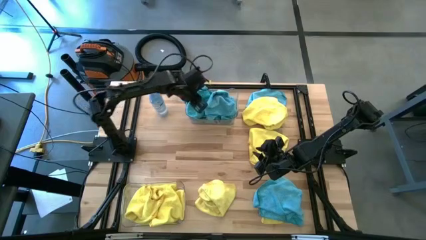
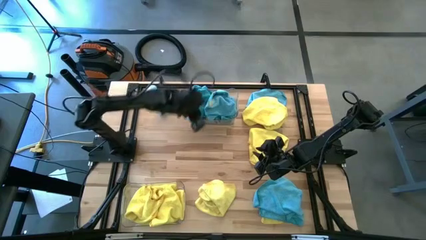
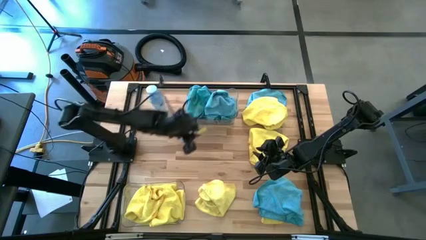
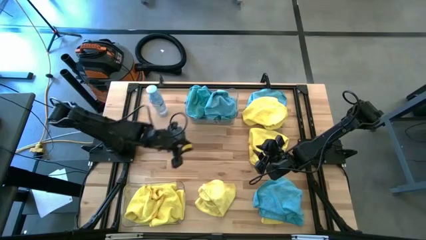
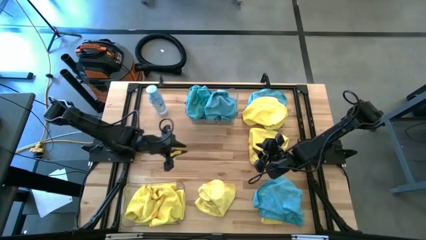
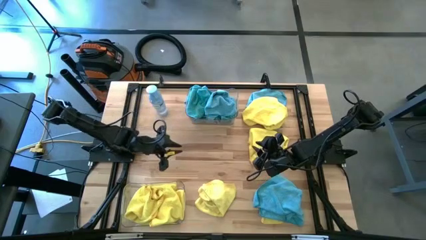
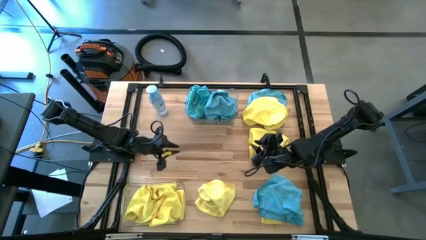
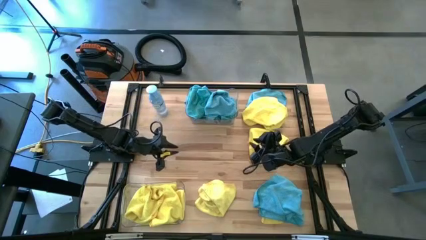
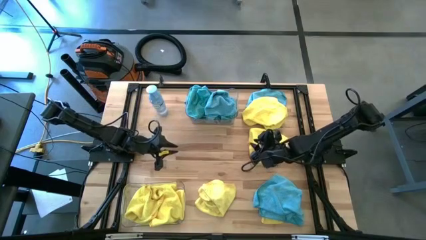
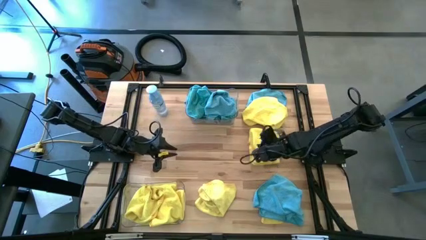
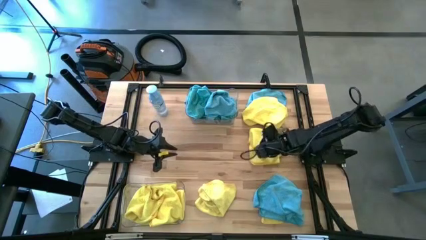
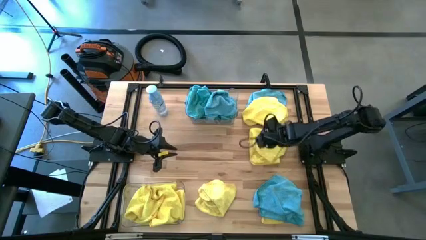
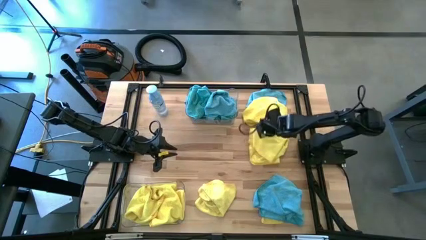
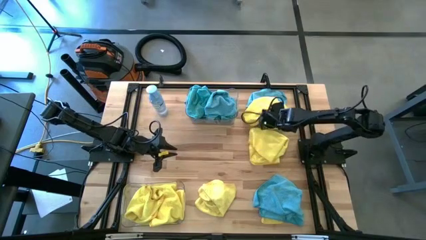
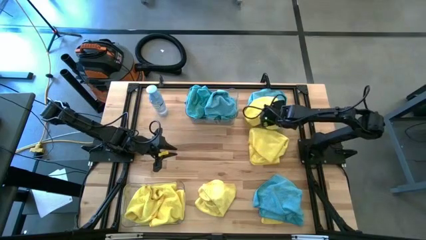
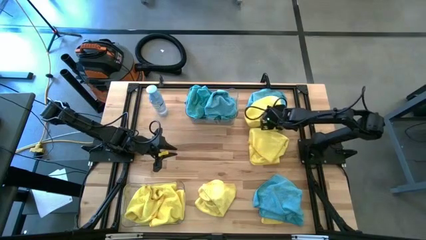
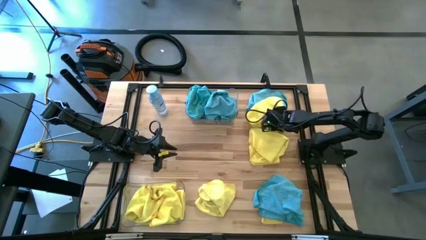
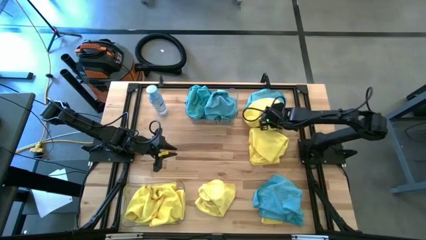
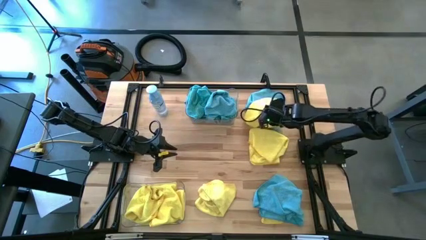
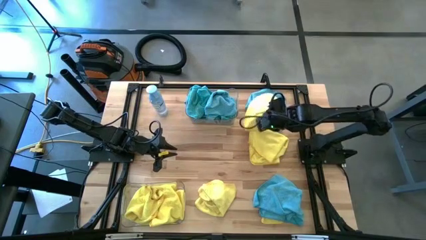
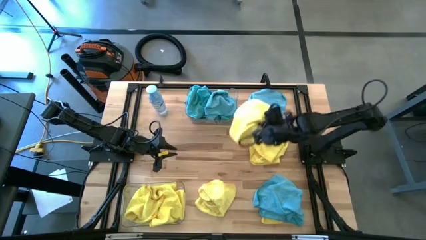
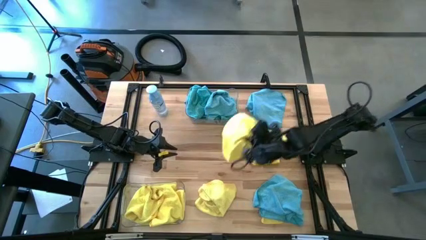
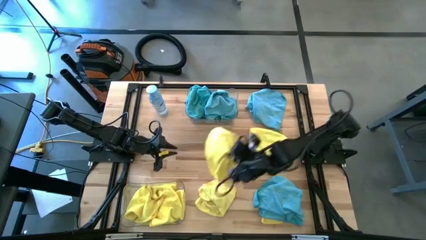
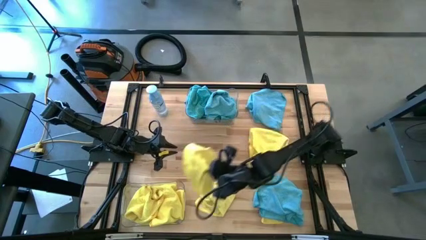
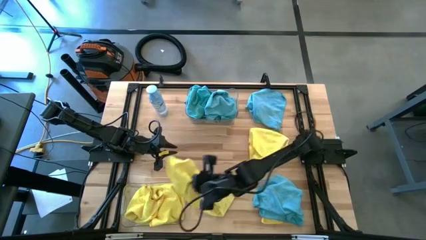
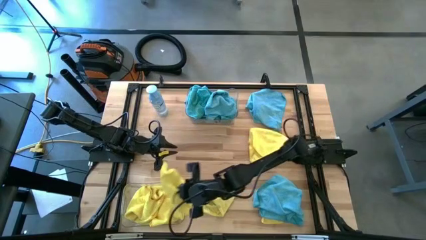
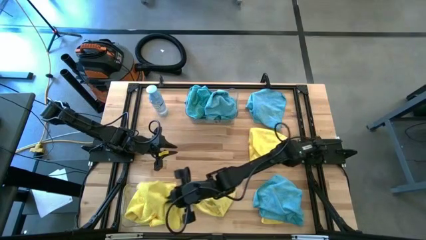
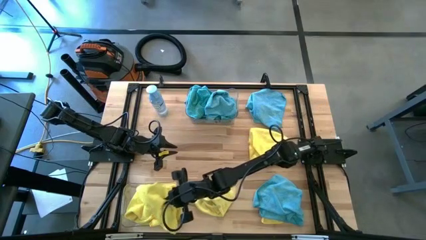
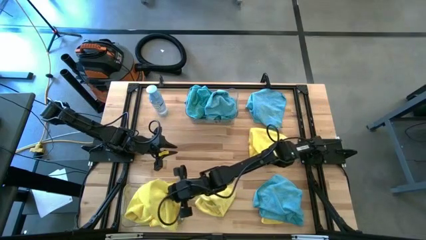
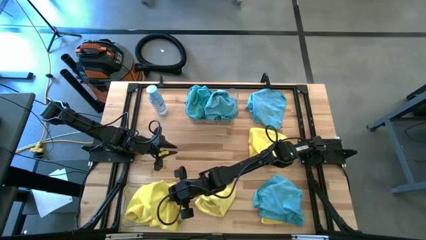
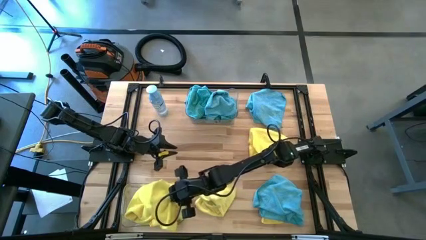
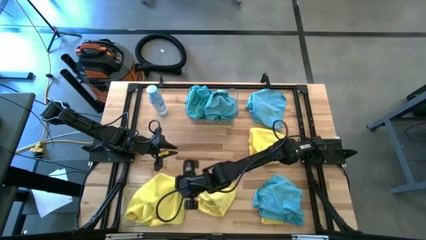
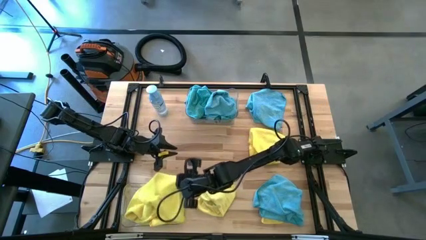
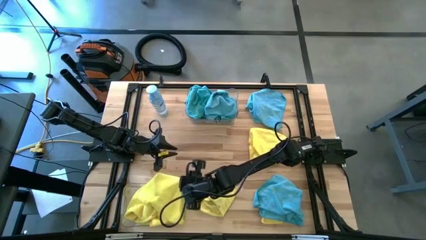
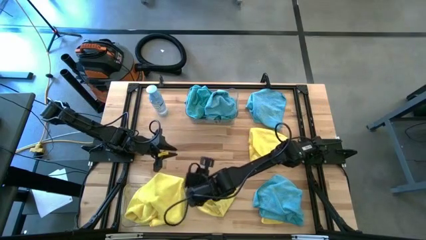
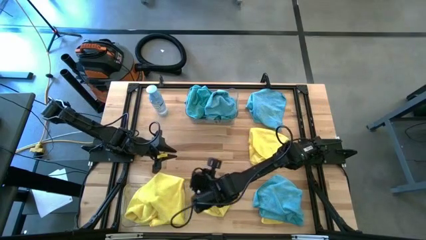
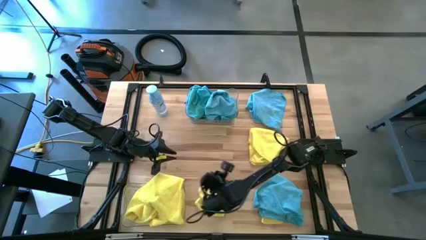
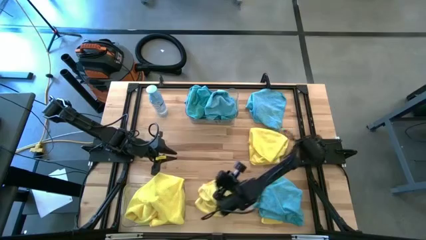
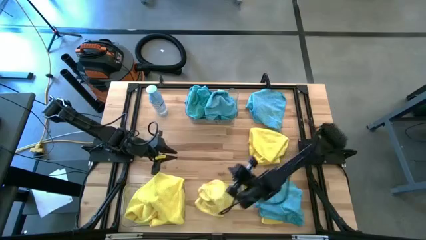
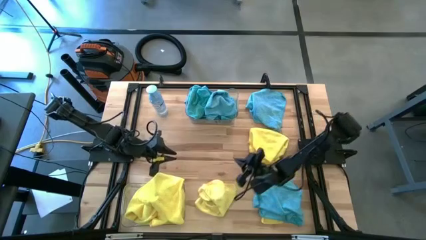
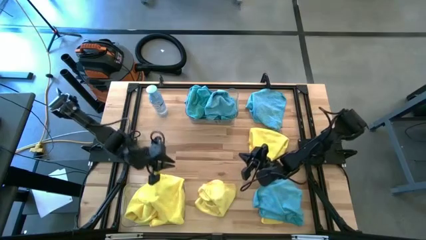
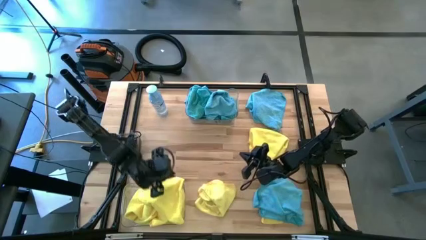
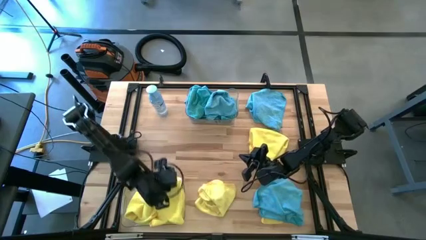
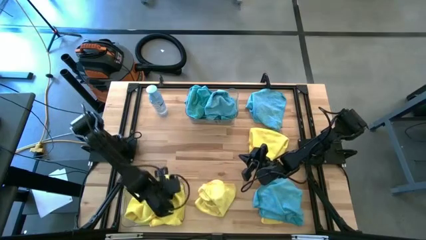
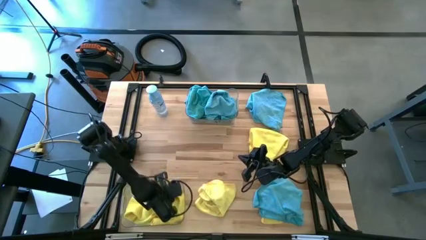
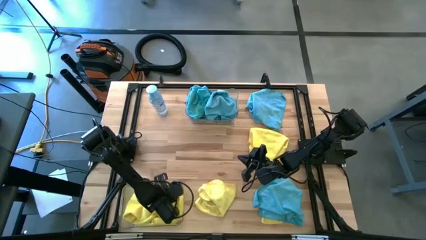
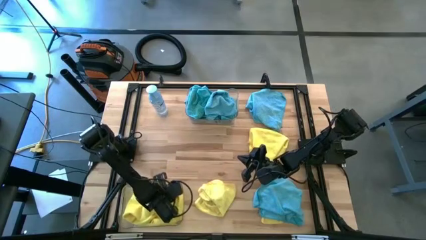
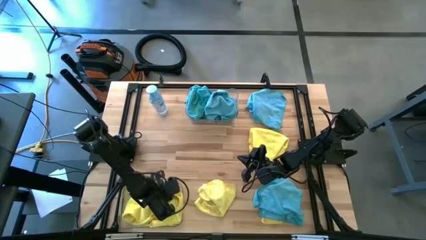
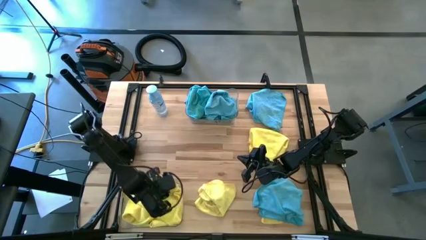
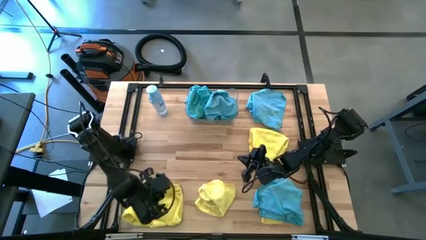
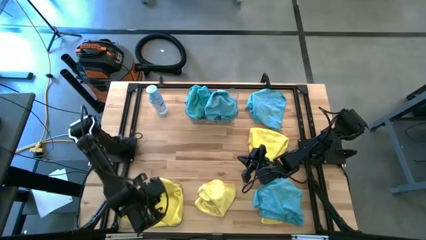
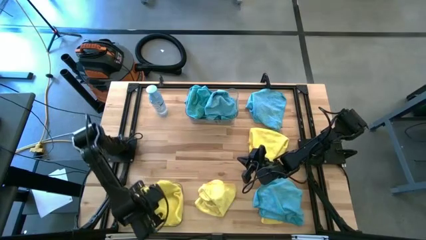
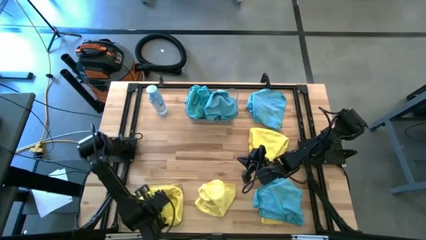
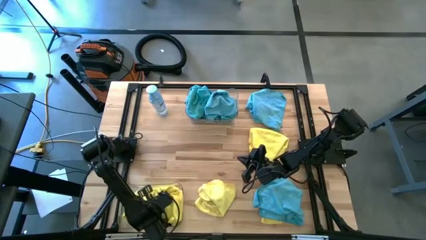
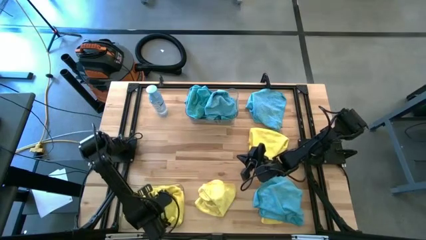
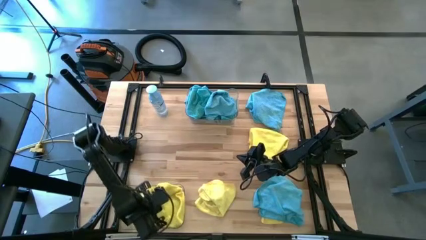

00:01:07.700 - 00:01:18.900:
Task: Sort microfiber towel by color & place in baskets
Put the yellow microfiber towel into the bottom transparent bin

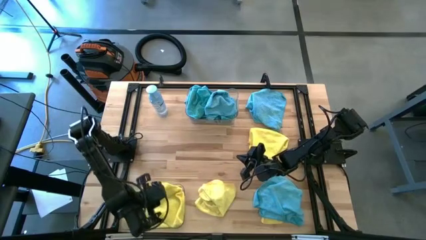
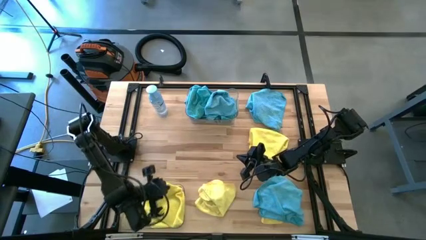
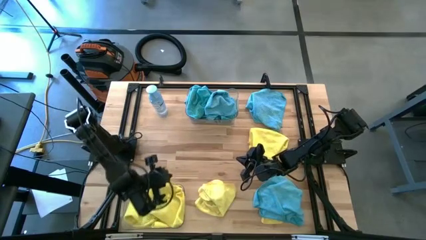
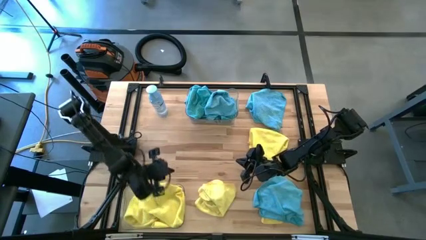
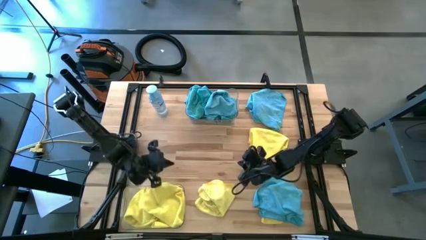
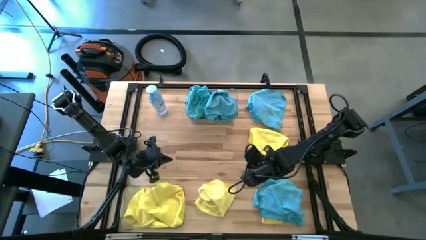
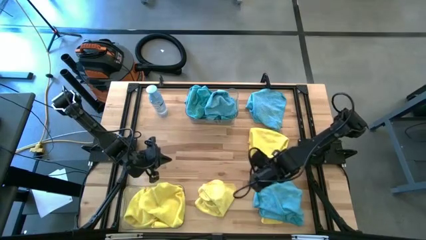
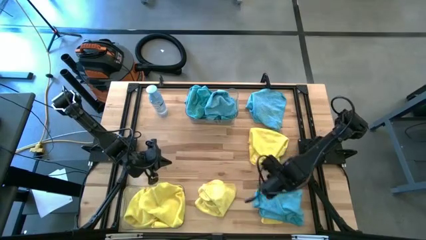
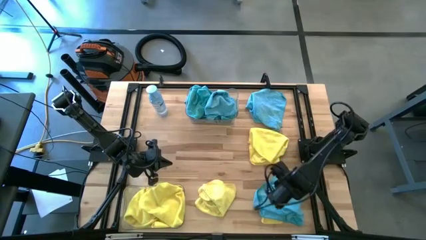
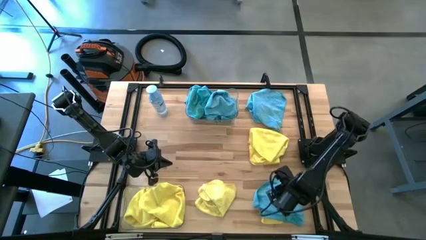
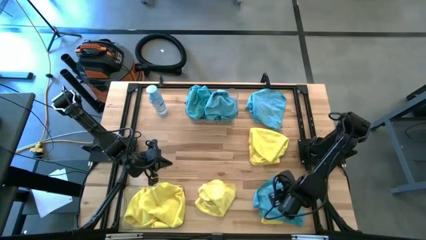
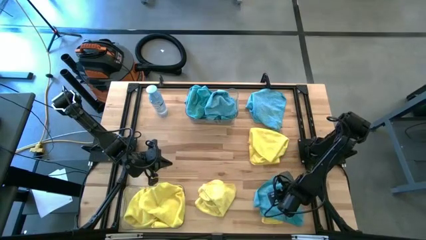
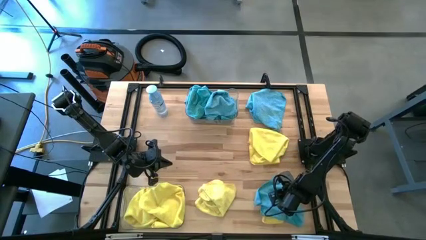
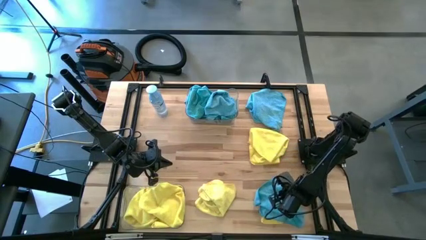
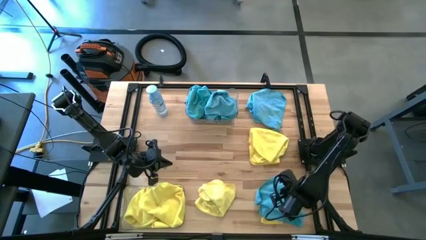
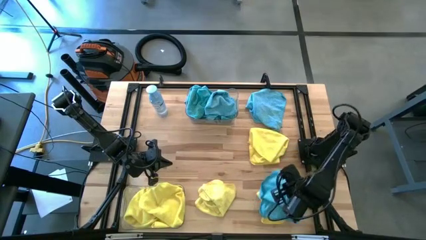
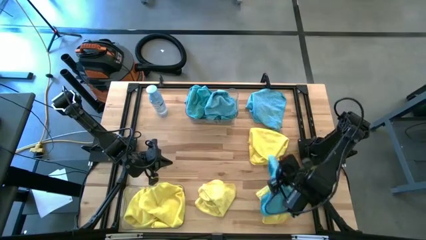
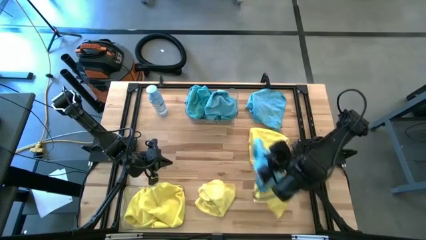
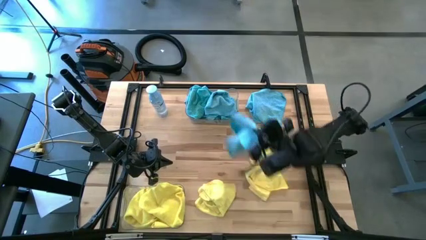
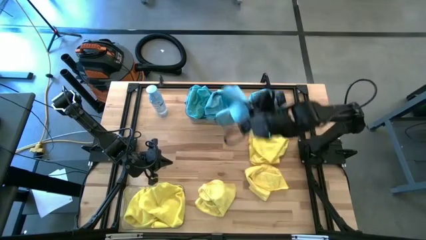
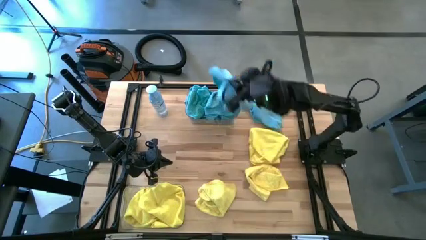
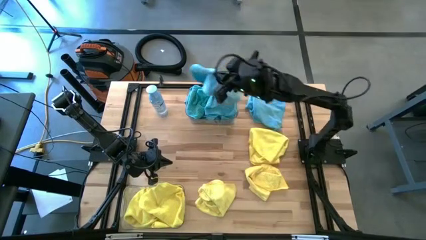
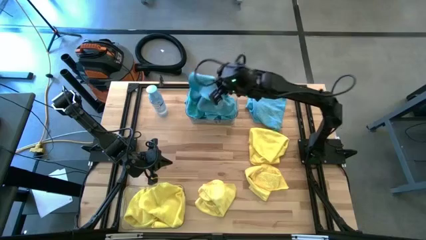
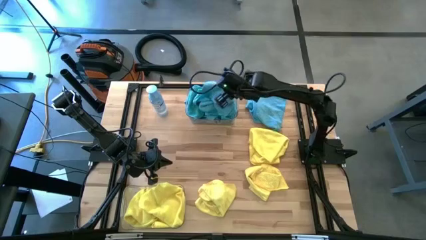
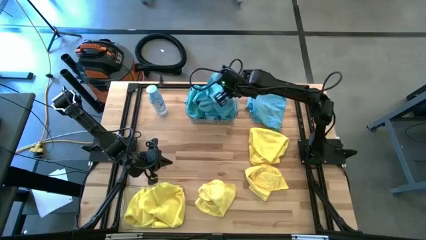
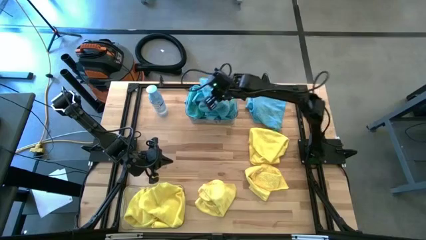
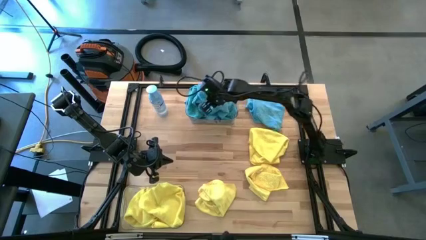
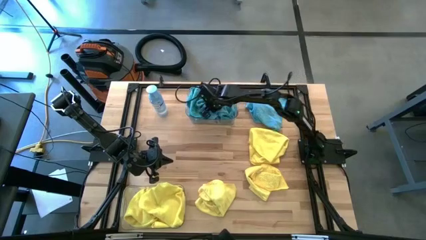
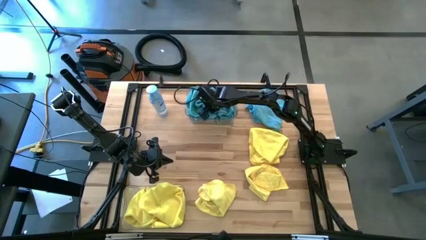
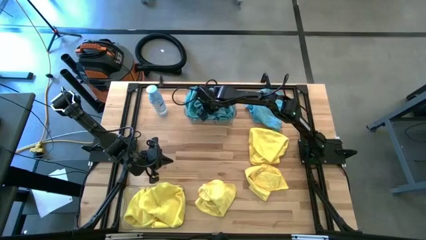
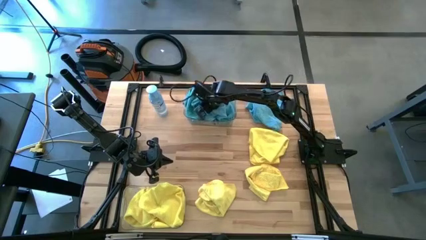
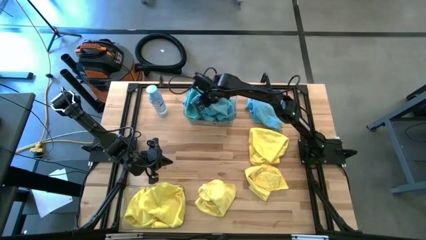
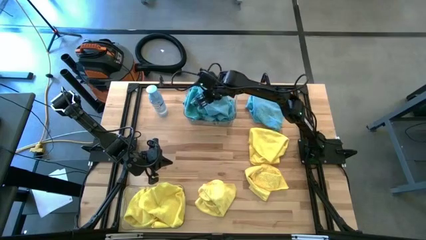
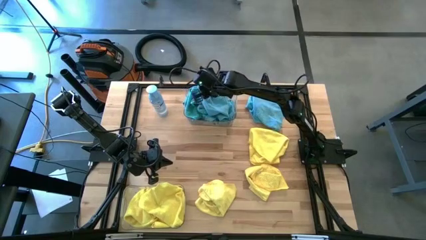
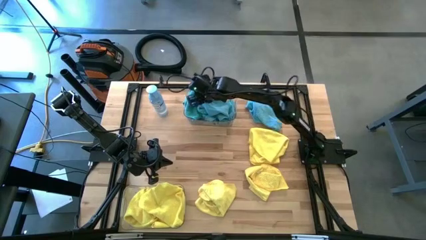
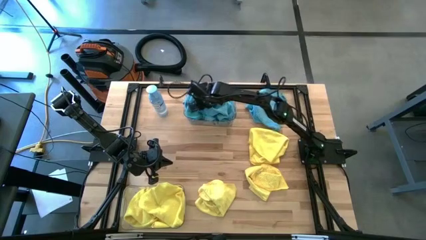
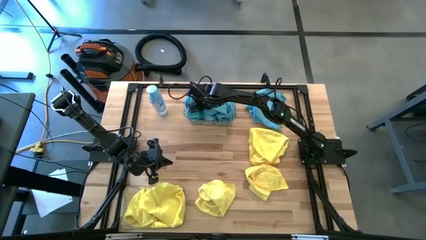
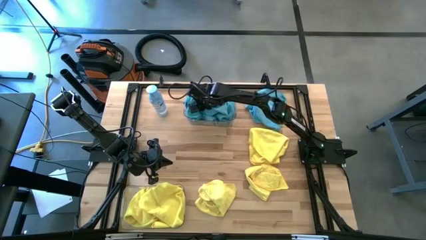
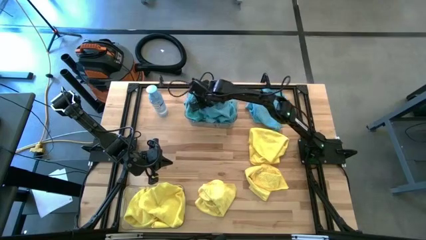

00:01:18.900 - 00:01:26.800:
Put the blue microfiber towel into the top transparent bin
